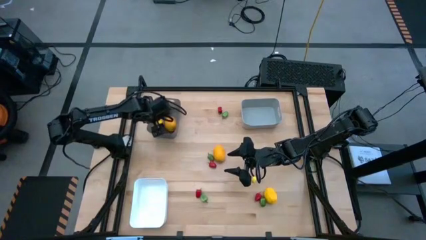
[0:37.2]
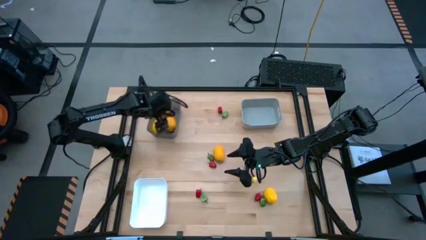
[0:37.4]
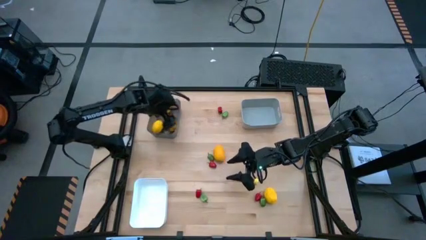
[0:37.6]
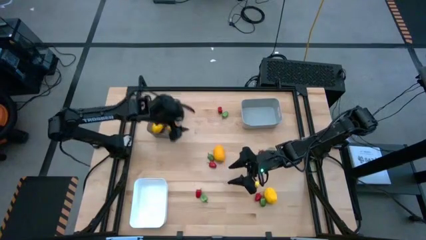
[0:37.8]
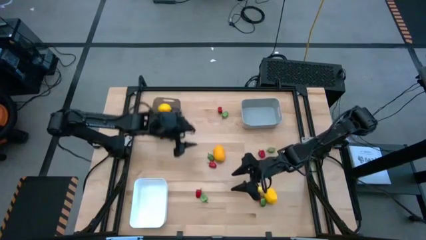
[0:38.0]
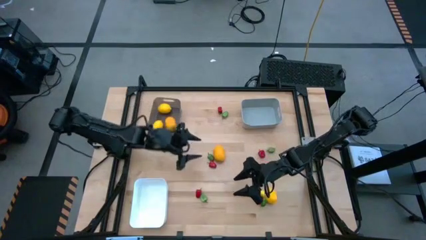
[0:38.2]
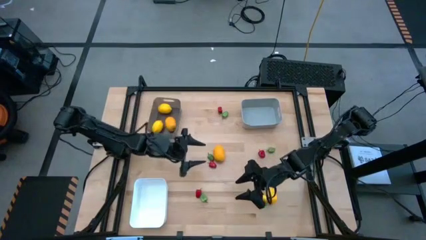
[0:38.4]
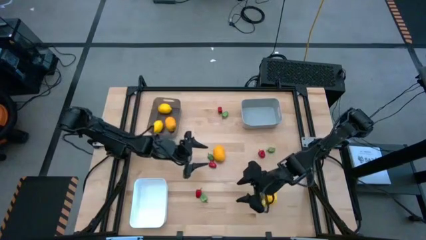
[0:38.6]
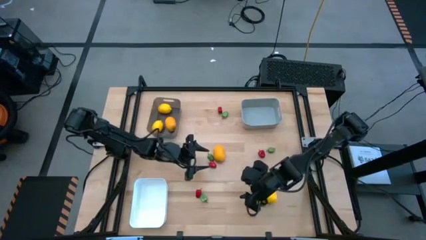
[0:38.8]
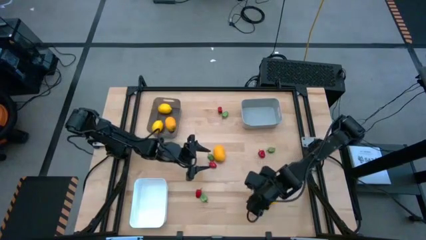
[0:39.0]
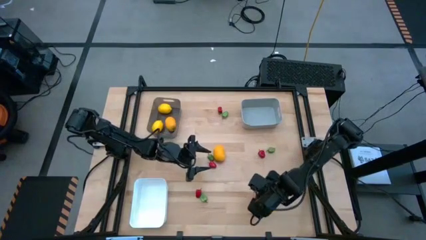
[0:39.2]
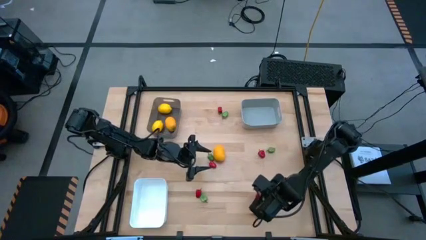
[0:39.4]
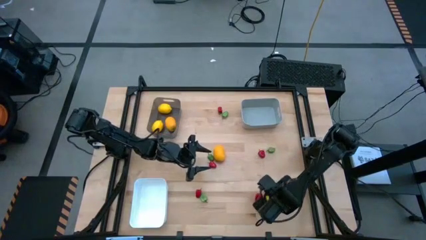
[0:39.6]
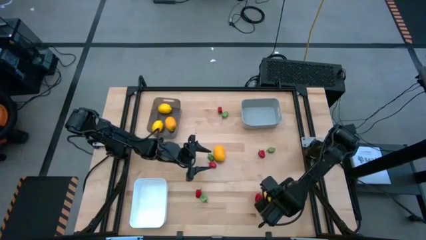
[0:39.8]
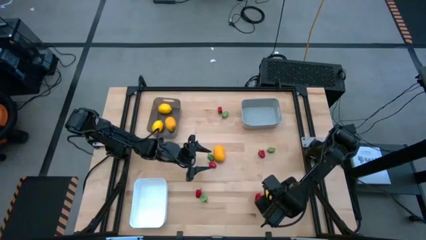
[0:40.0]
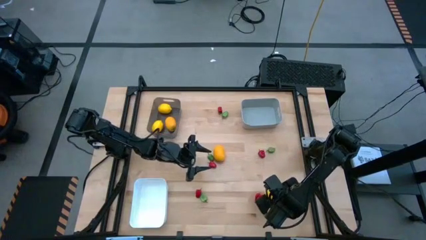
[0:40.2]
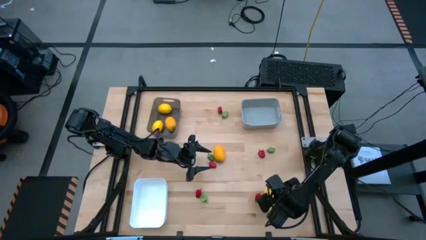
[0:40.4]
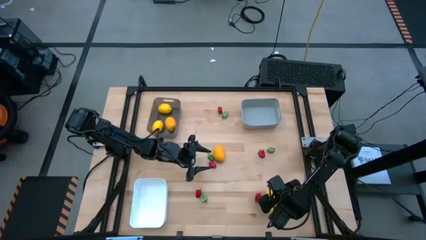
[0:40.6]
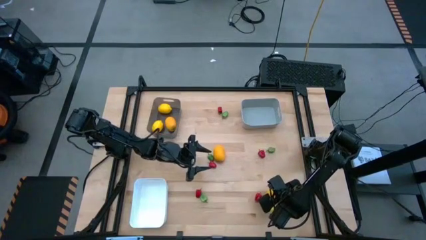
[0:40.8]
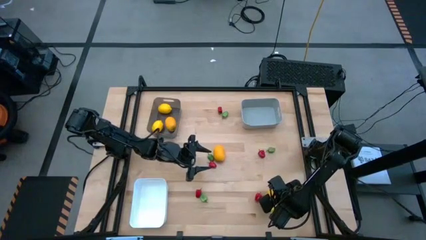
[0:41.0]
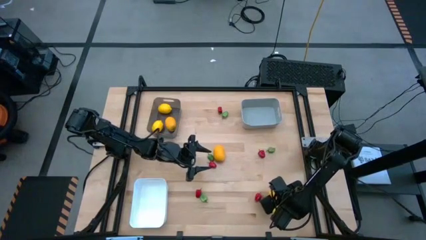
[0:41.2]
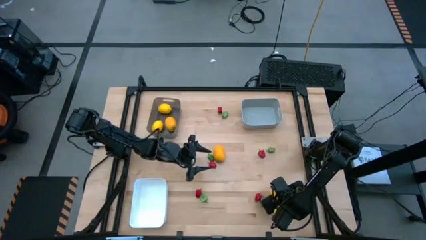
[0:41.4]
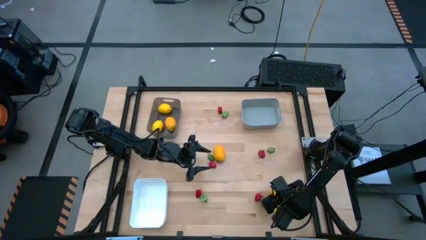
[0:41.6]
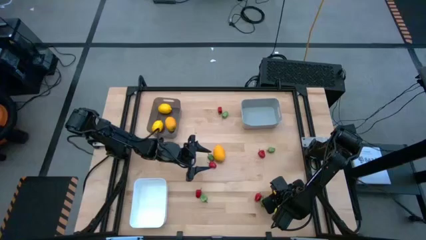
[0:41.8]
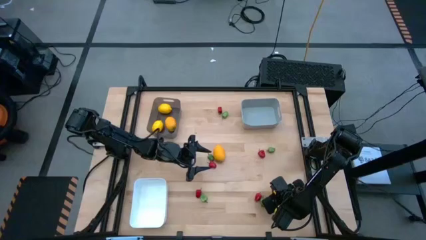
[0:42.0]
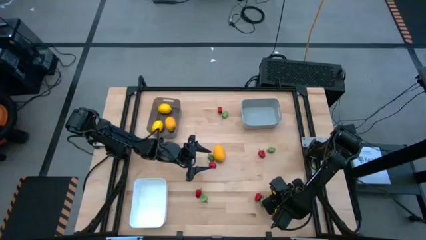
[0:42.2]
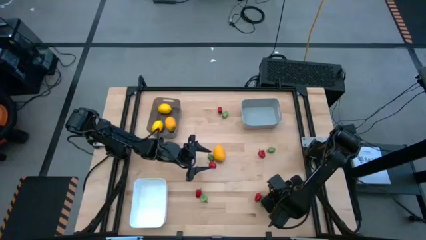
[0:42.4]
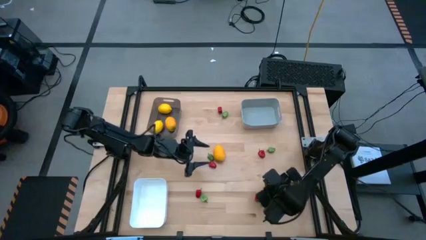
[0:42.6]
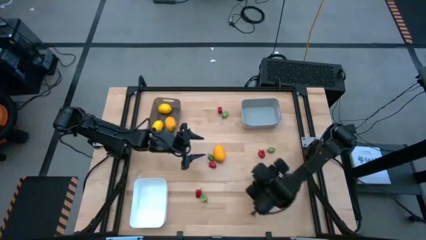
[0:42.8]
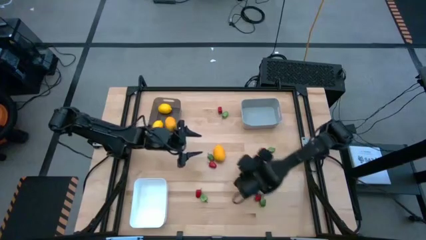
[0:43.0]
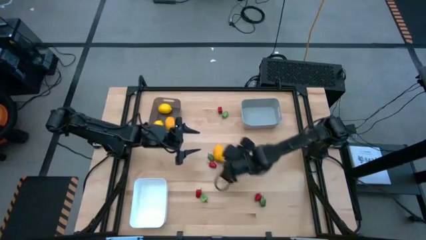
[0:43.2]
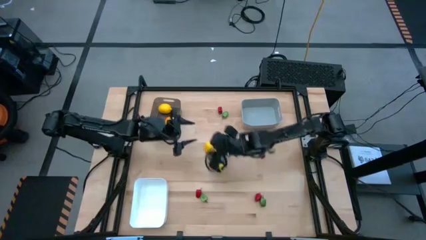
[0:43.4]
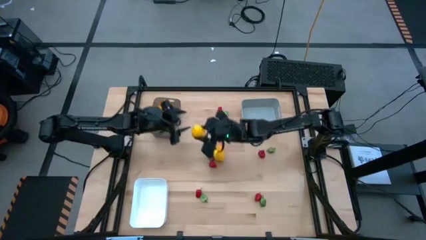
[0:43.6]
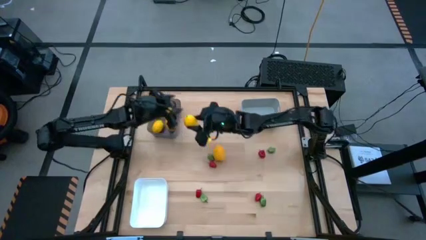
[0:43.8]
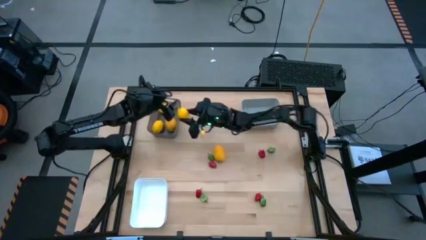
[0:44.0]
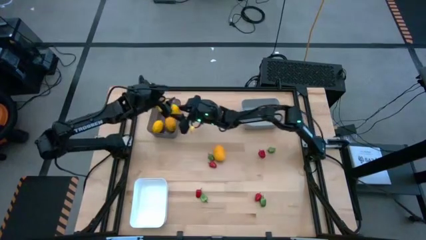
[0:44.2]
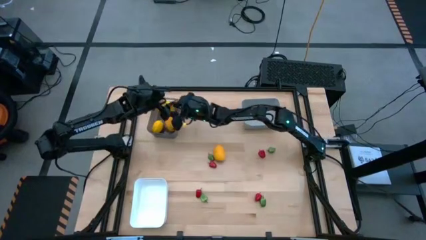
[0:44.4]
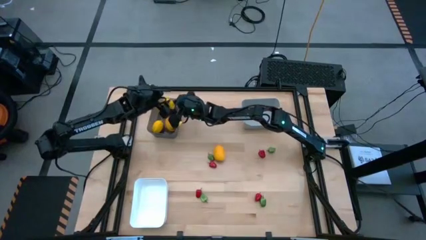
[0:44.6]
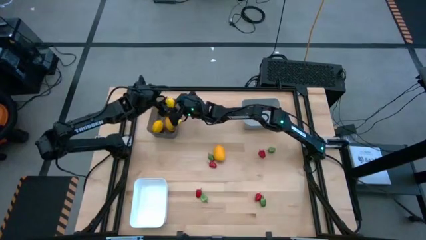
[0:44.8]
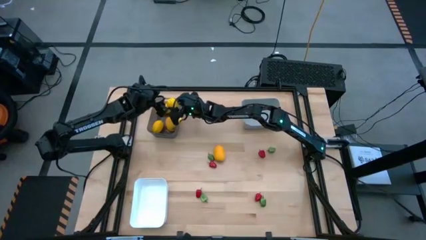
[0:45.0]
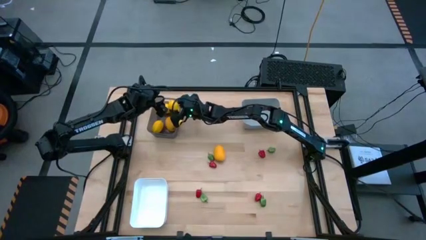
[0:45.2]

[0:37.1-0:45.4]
Task: Sort produce into baskets
Put the lemon into the black bin
